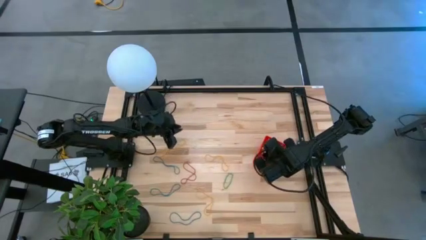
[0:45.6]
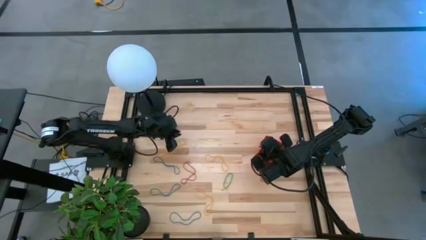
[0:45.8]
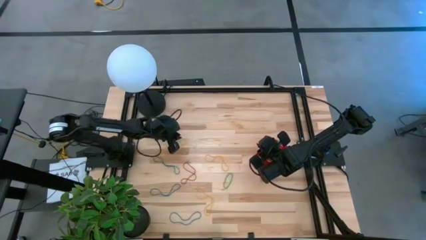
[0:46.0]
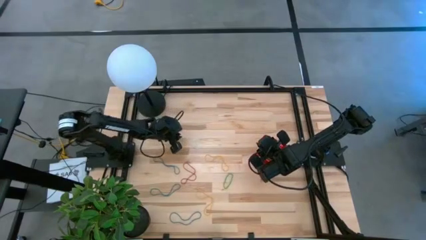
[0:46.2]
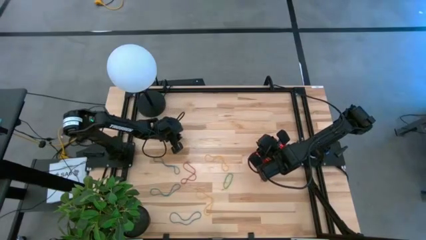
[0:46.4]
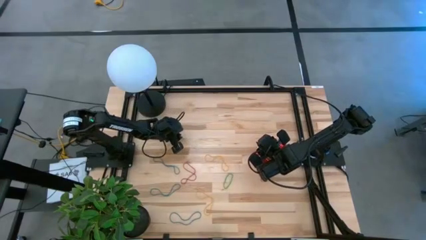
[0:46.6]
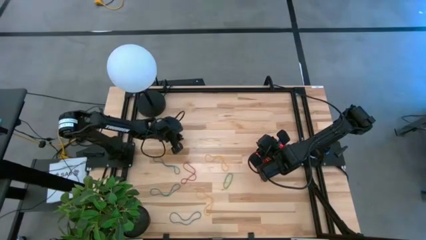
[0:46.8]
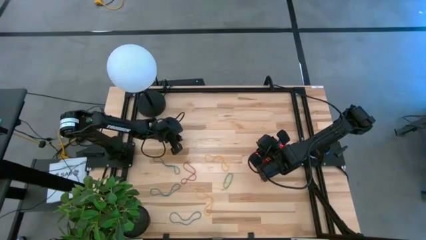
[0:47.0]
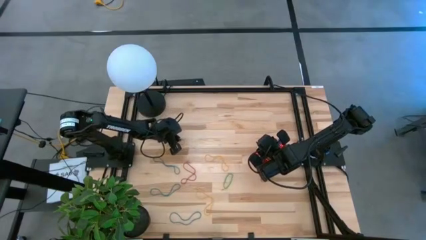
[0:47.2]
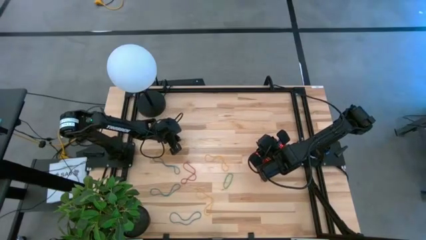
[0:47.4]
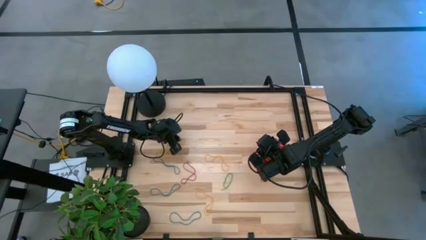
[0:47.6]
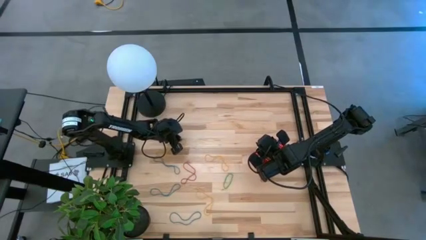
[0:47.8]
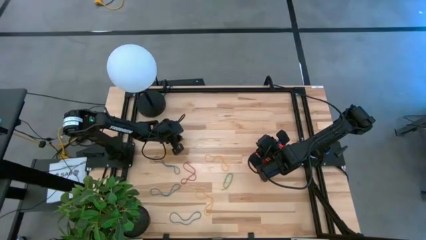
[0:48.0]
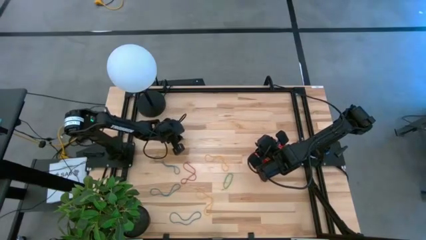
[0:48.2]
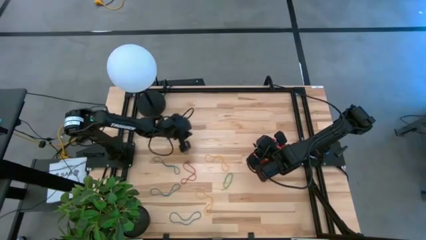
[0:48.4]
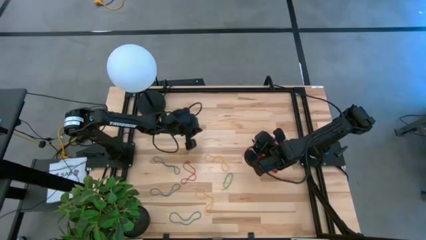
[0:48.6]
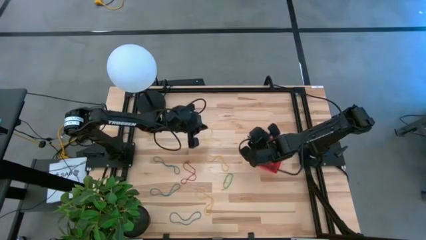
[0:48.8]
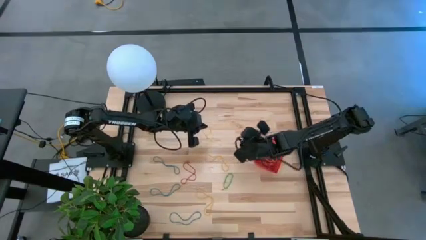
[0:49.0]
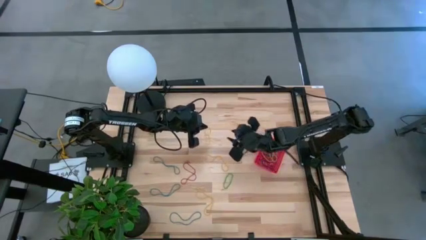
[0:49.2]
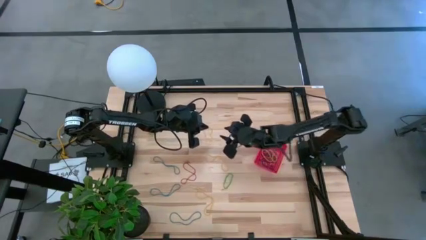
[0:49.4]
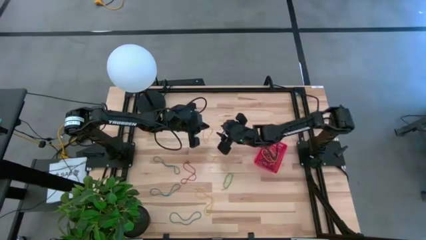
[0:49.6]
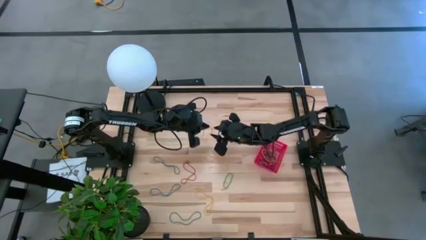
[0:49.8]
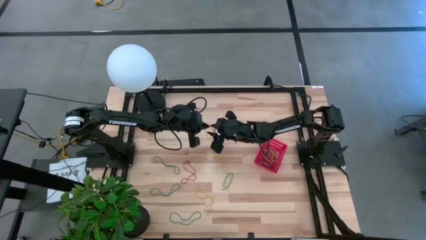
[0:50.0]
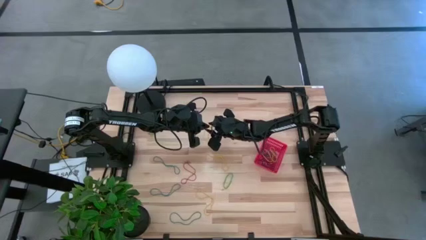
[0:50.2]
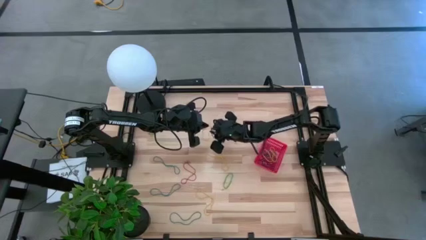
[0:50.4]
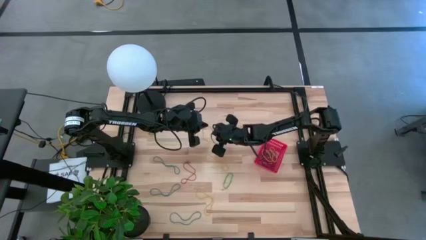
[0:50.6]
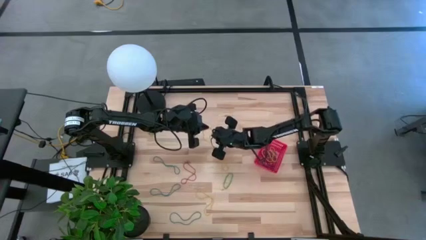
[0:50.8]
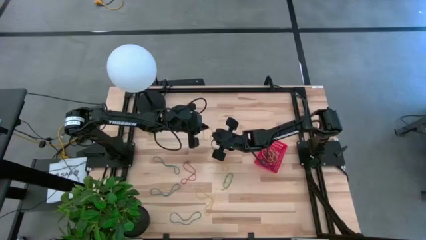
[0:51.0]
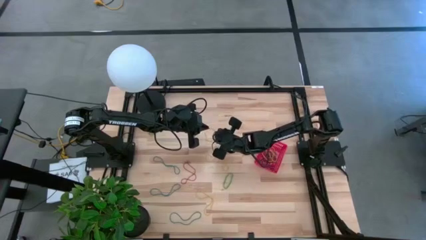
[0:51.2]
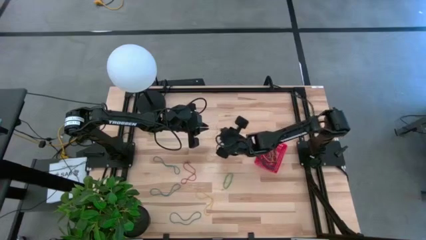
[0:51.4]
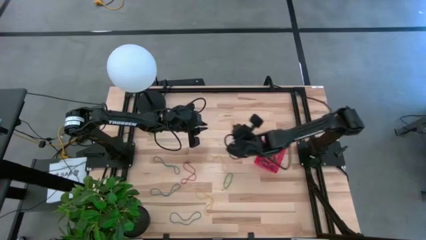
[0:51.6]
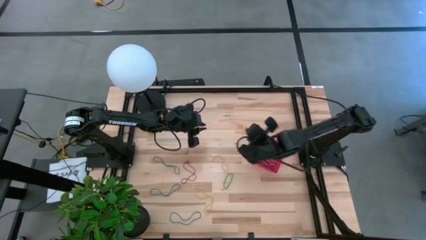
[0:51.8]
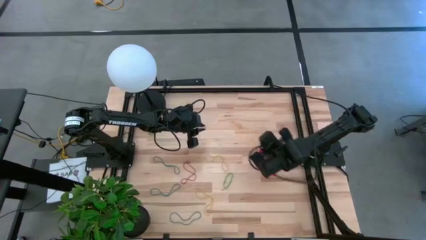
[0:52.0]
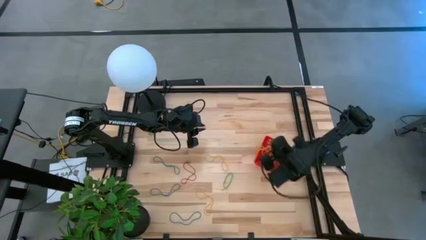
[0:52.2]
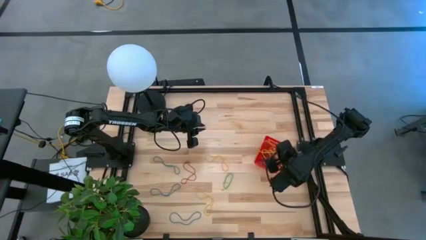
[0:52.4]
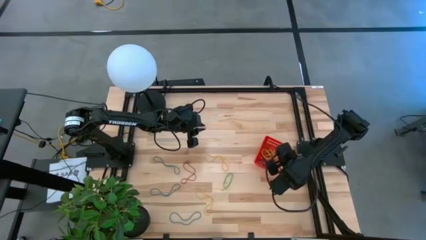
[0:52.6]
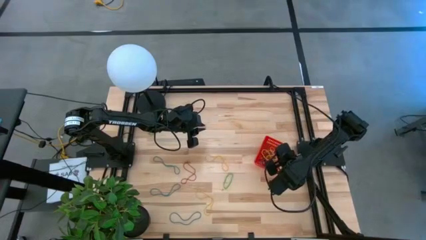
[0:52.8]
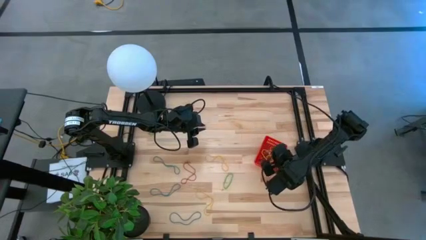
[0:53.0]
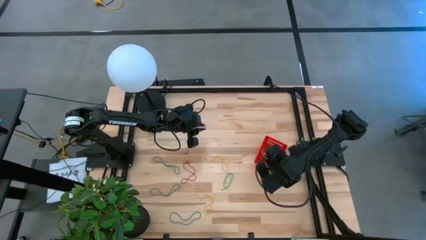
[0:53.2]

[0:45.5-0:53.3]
Task: Pick and place rubber bands into bin
Put the yellow rubber band into the basket

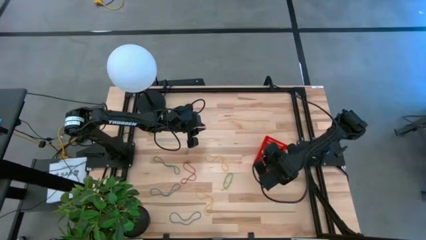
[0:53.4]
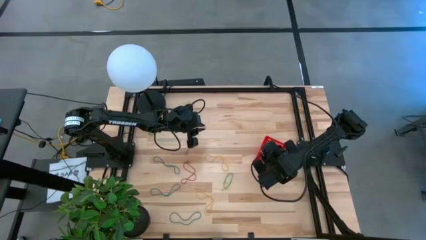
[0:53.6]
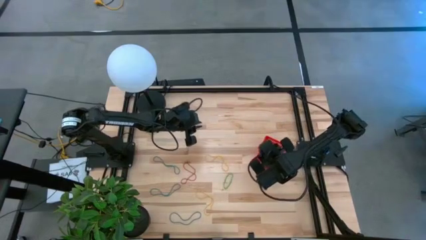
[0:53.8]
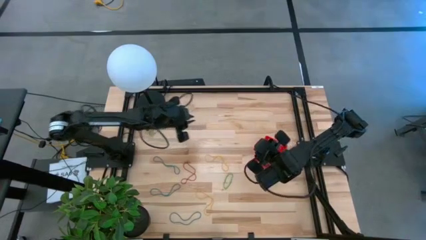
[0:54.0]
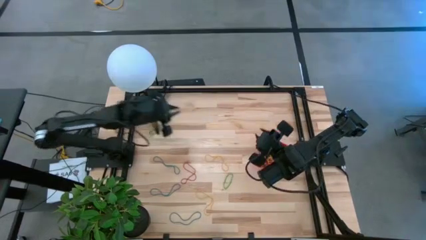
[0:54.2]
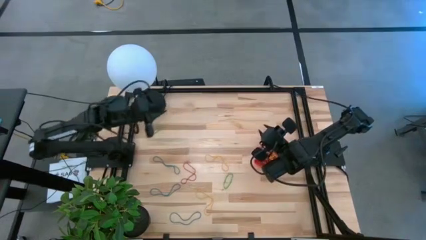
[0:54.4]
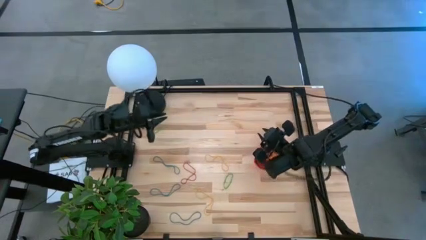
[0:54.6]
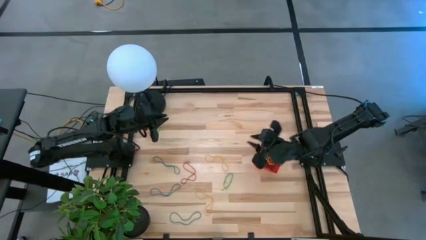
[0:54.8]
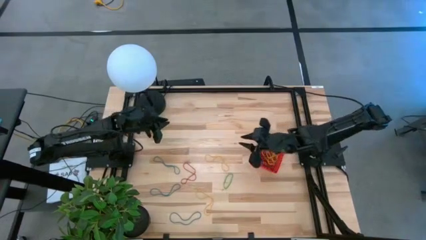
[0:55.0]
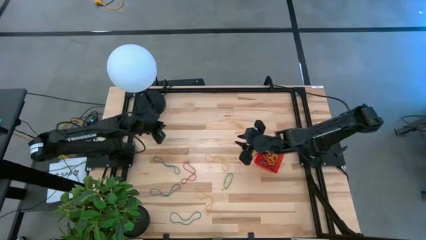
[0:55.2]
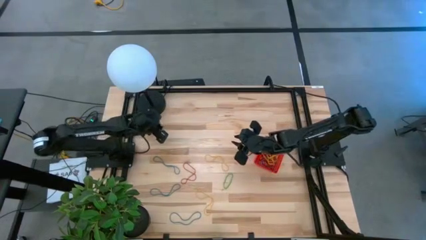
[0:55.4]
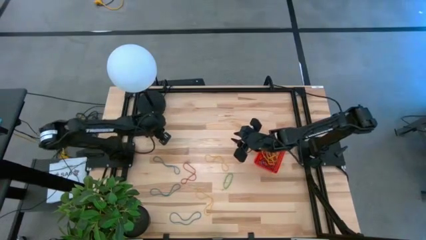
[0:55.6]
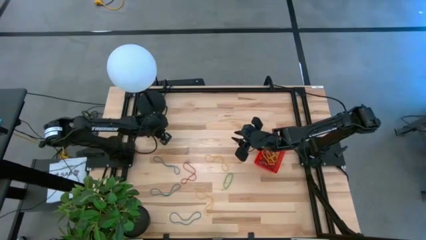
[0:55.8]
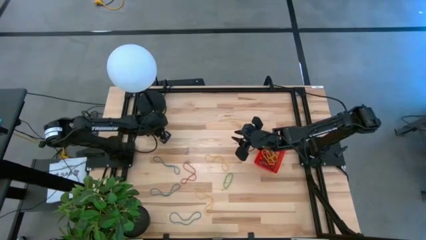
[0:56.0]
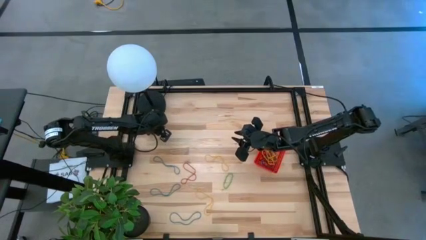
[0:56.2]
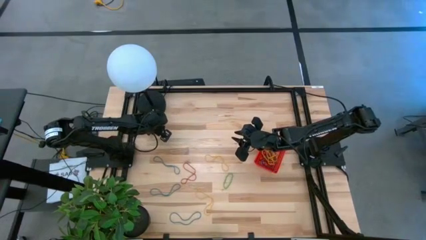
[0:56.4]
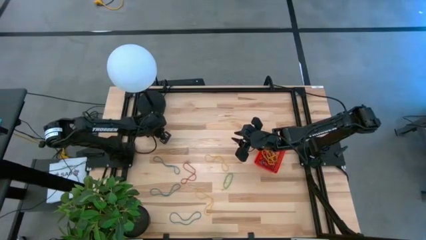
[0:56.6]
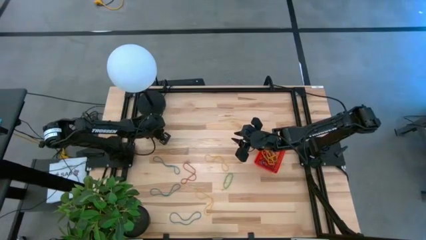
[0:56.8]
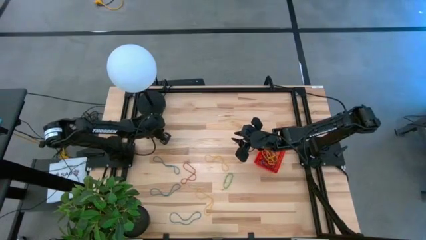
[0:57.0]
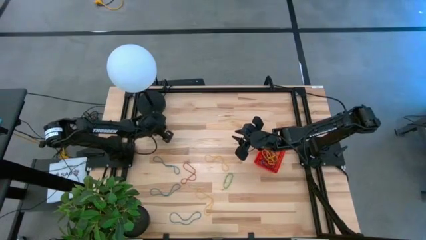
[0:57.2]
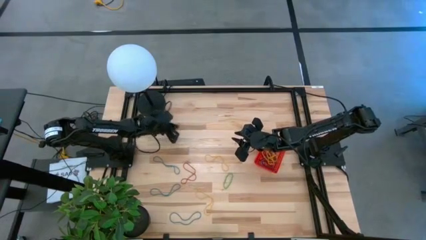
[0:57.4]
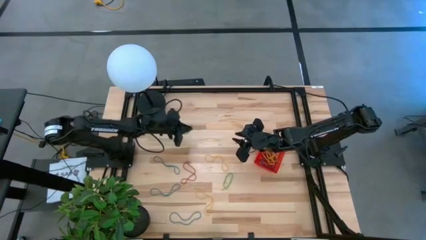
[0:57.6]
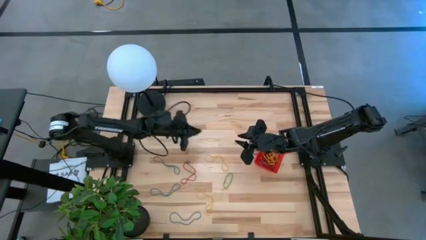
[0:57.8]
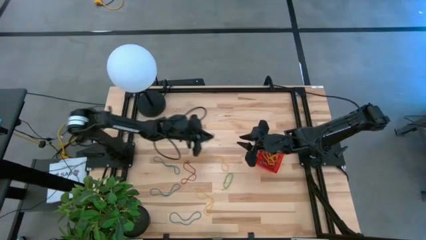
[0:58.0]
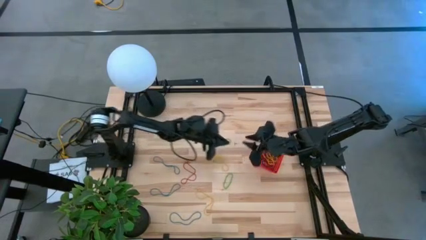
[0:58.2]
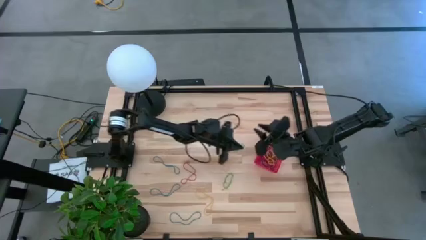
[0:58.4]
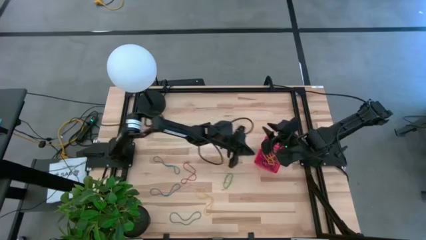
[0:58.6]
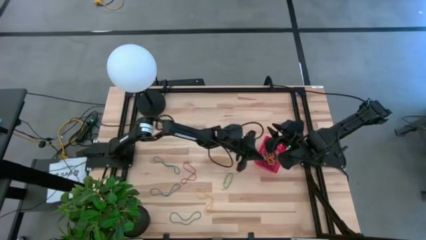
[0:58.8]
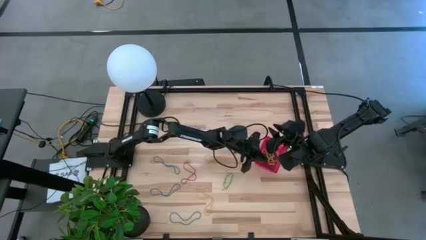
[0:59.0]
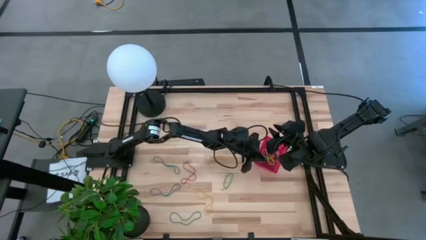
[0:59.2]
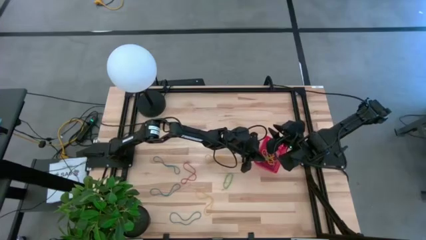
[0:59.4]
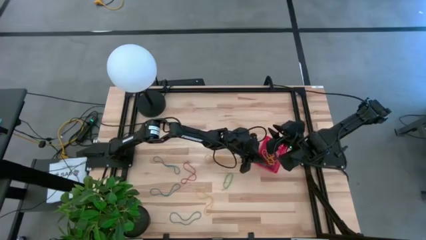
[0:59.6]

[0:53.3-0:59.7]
Put the top left green rubber band into the basket

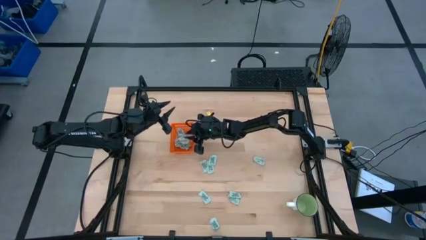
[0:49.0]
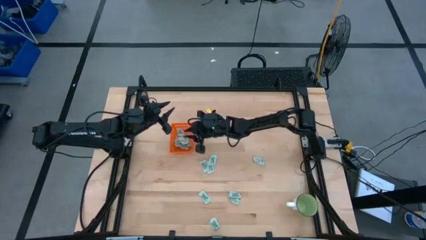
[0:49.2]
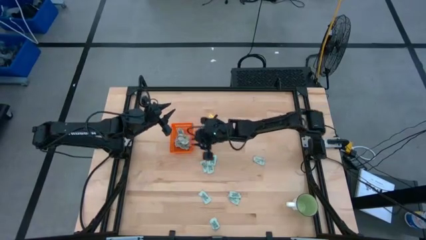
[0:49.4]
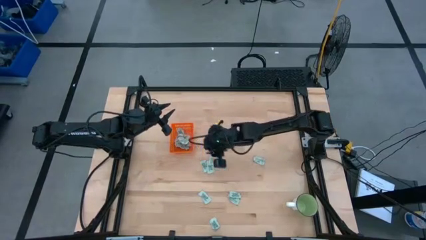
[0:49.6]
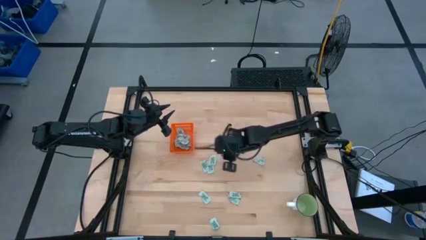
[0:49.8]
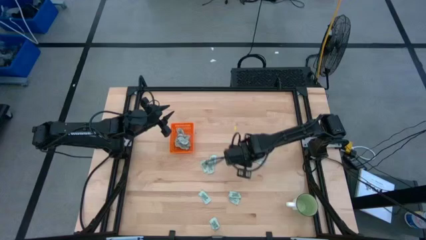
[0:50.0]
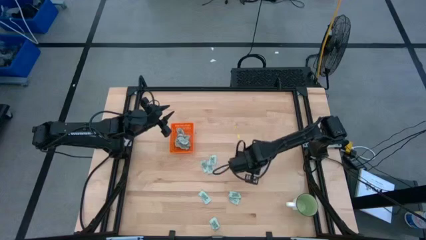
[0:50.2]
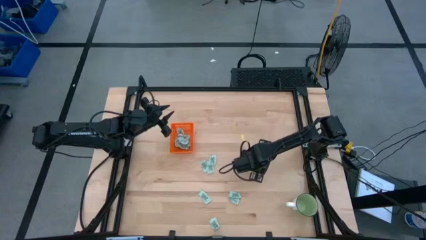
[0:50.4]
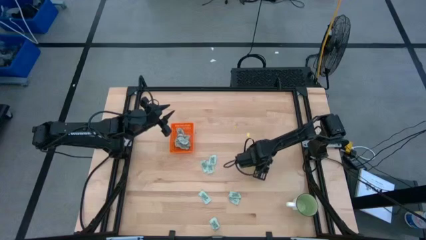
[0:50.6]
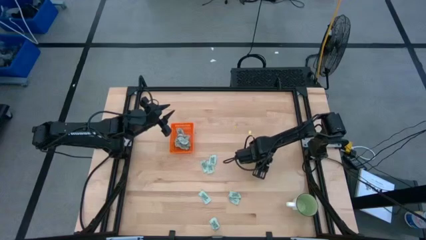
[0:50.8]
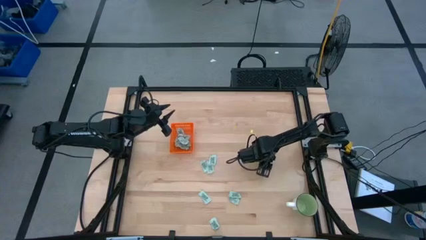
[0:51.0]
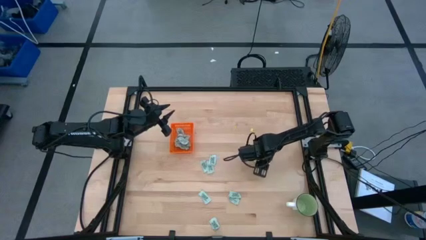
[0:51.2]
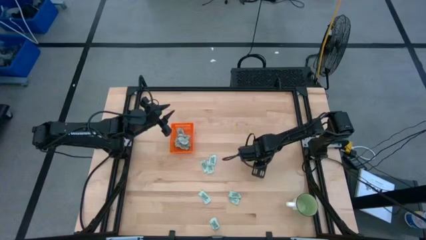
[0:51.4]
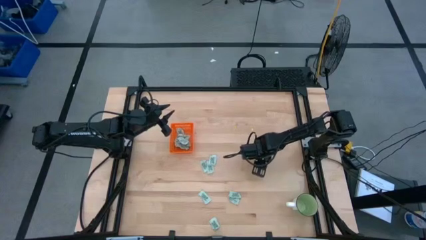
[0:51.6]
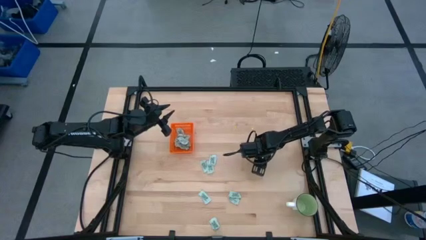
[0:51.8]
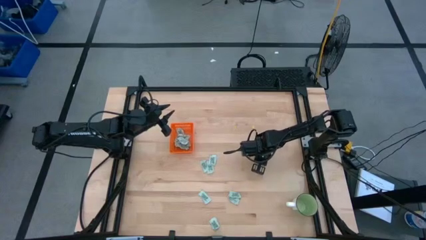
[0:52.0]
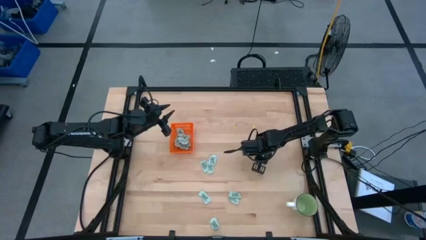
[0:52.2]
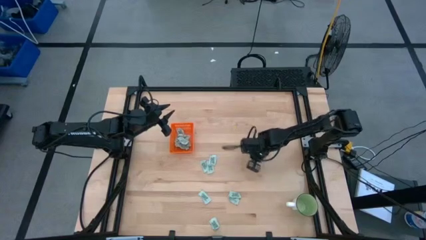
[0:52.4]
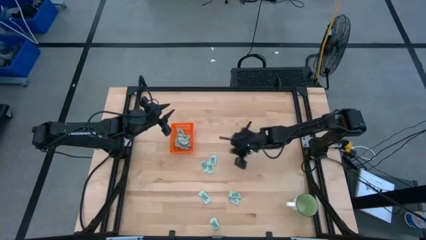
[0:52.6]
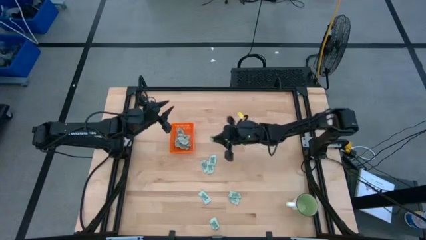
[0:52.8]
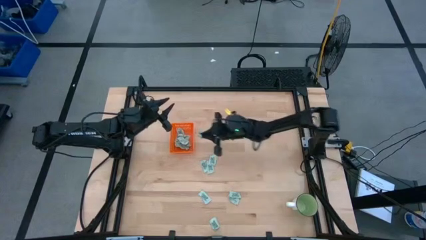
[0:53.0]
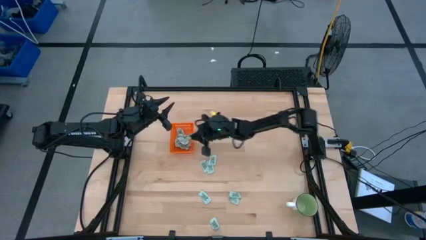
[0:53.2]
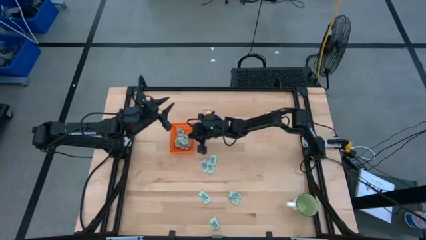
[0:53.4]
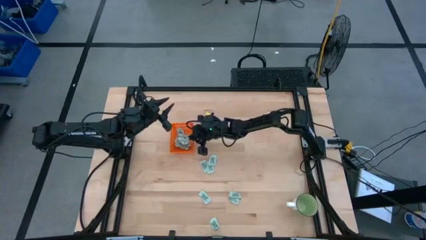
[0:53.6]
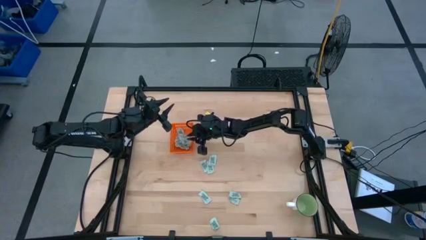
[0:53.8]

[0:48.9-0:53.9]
Task: Pick and place Stevia / Truvia into bins
Put the green stevia packet into the orange bin
